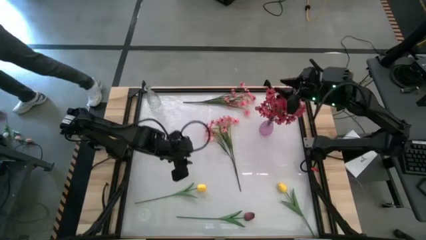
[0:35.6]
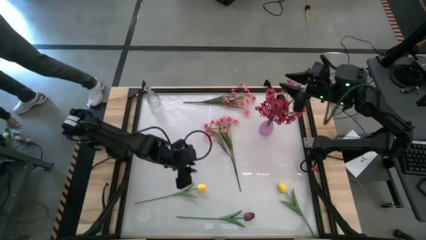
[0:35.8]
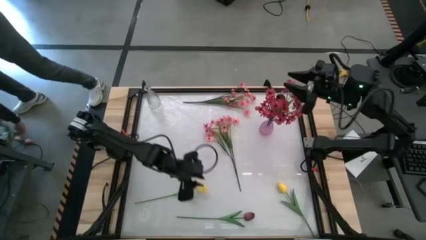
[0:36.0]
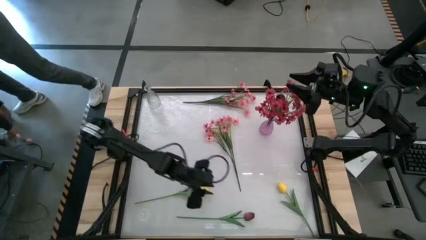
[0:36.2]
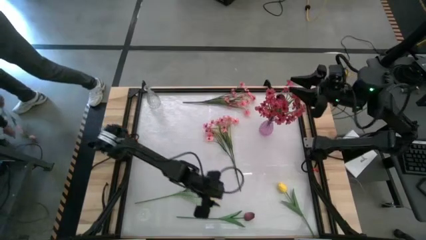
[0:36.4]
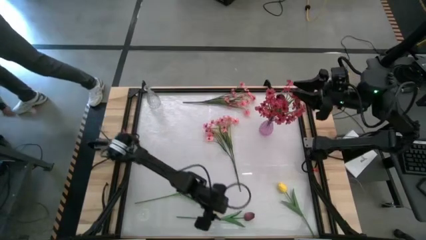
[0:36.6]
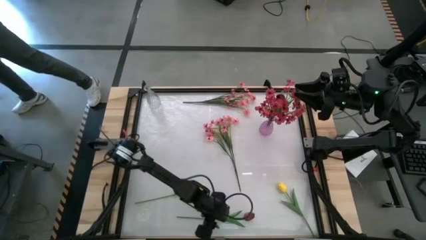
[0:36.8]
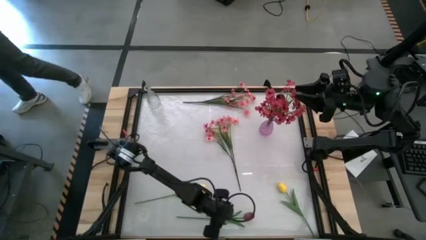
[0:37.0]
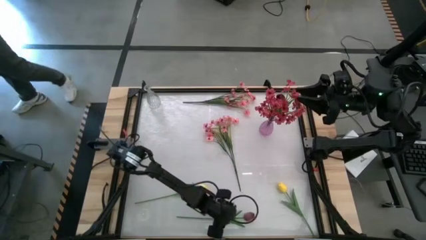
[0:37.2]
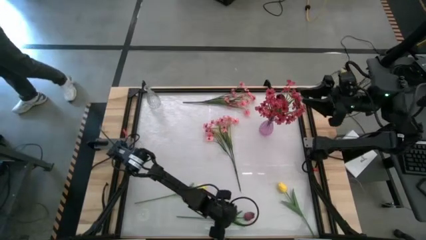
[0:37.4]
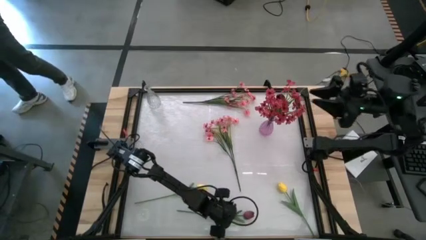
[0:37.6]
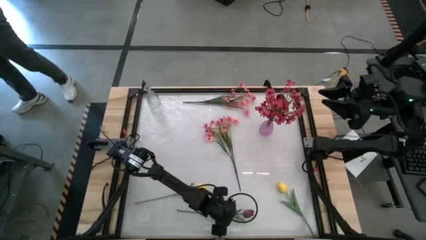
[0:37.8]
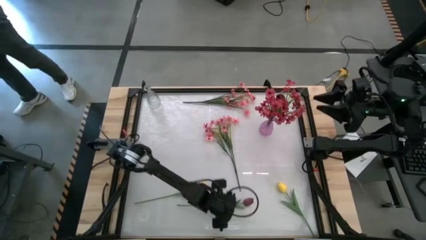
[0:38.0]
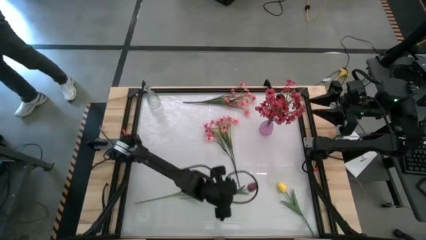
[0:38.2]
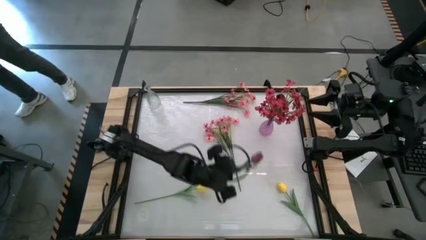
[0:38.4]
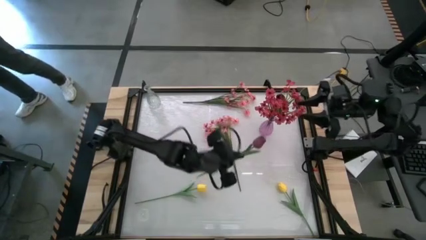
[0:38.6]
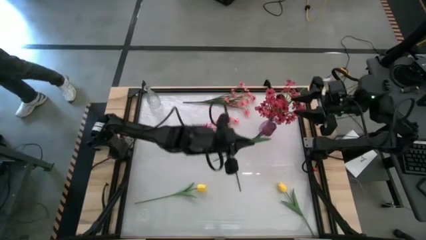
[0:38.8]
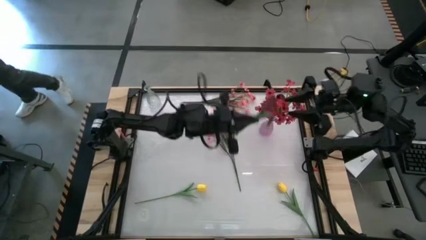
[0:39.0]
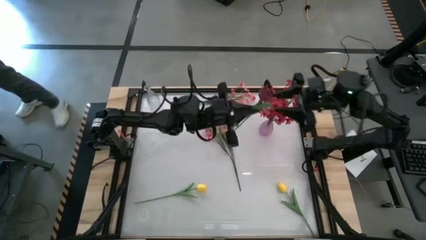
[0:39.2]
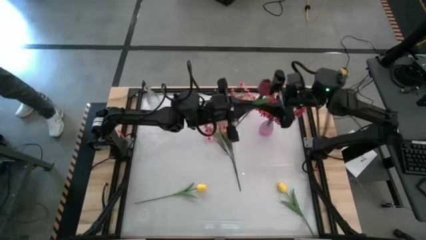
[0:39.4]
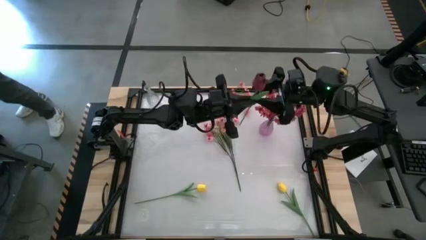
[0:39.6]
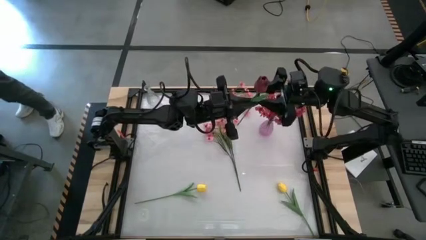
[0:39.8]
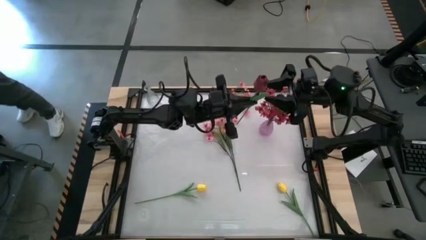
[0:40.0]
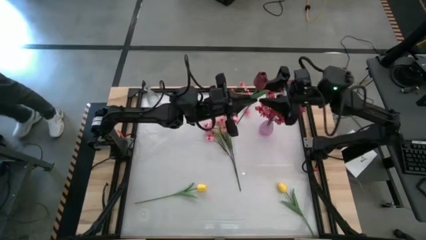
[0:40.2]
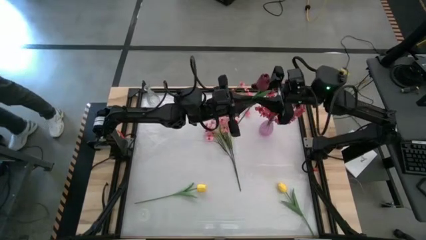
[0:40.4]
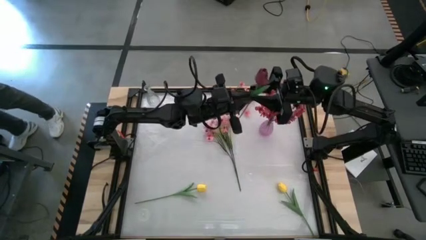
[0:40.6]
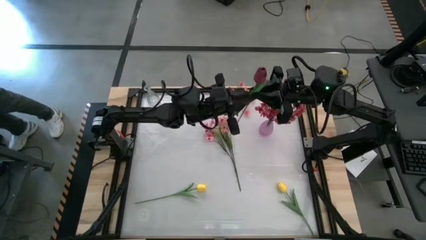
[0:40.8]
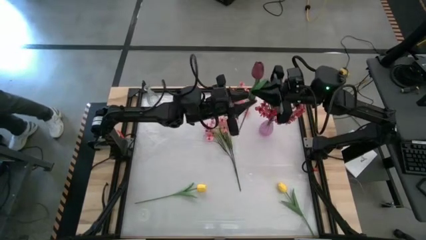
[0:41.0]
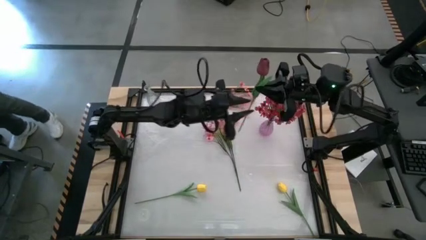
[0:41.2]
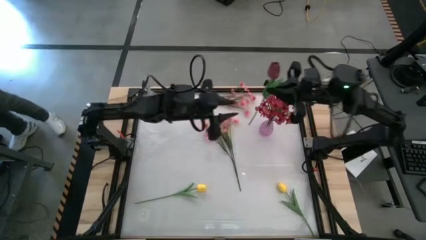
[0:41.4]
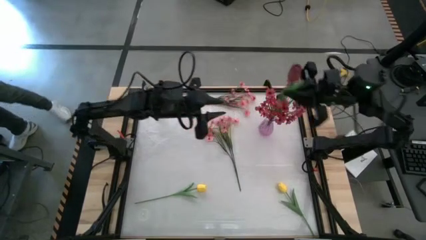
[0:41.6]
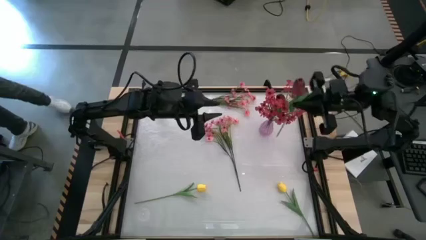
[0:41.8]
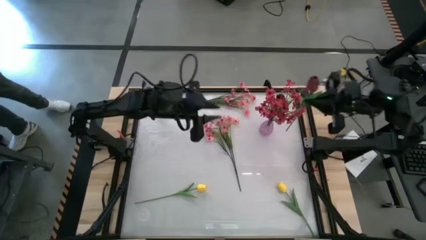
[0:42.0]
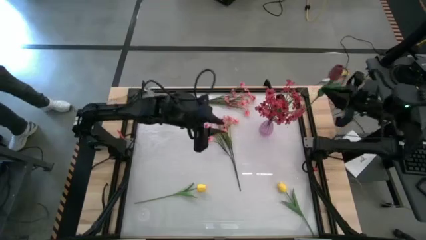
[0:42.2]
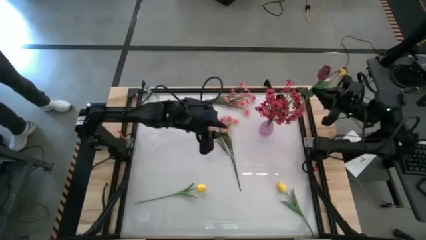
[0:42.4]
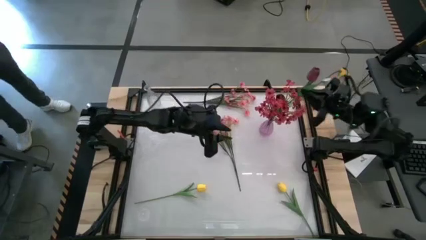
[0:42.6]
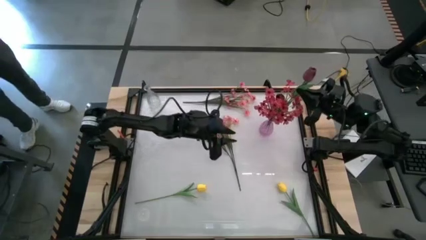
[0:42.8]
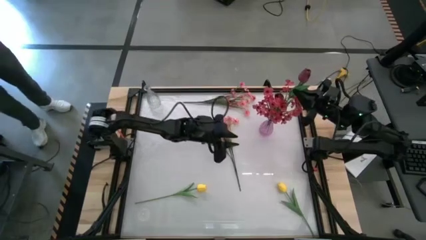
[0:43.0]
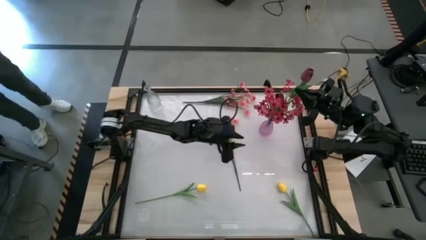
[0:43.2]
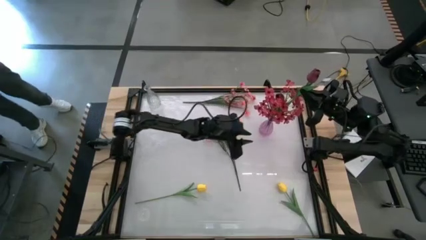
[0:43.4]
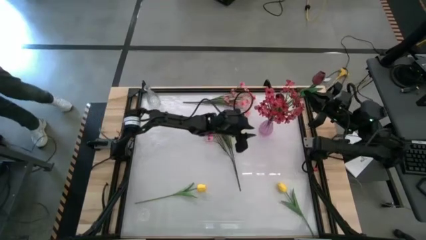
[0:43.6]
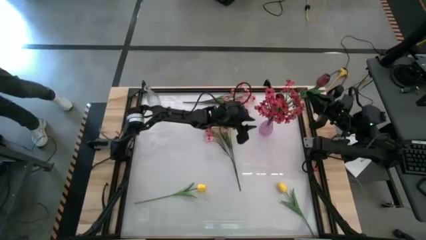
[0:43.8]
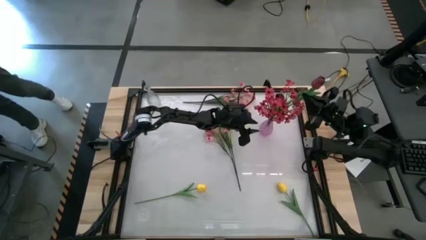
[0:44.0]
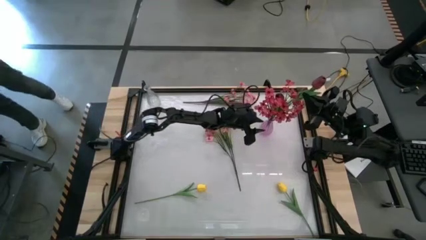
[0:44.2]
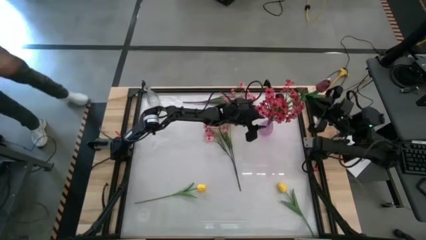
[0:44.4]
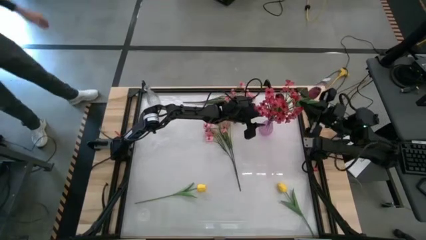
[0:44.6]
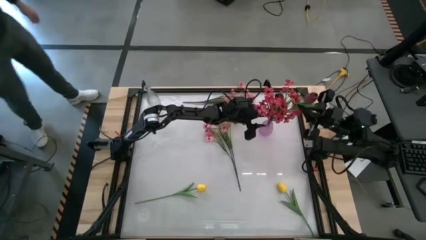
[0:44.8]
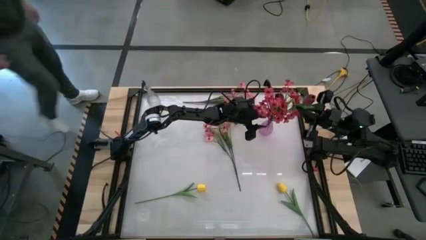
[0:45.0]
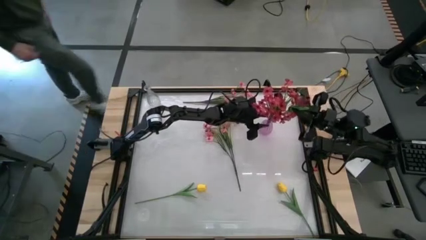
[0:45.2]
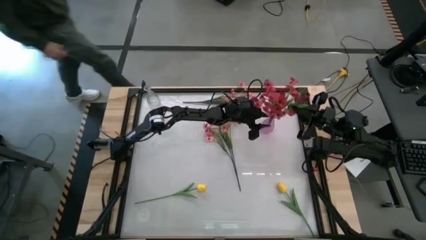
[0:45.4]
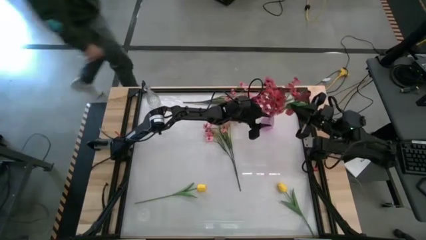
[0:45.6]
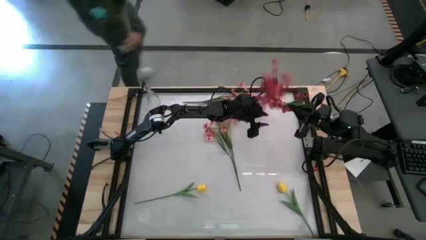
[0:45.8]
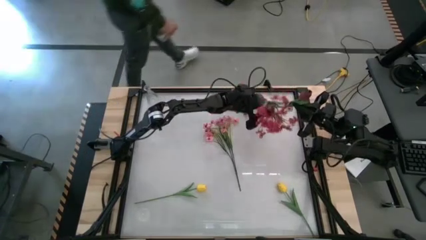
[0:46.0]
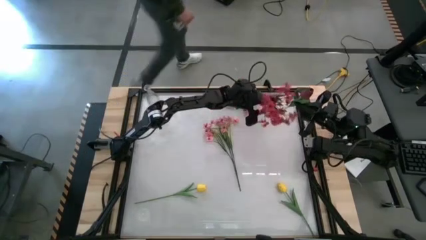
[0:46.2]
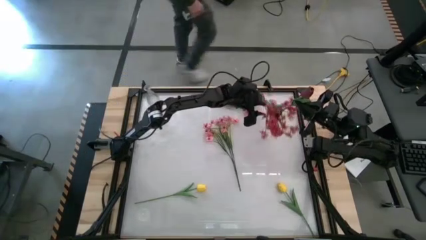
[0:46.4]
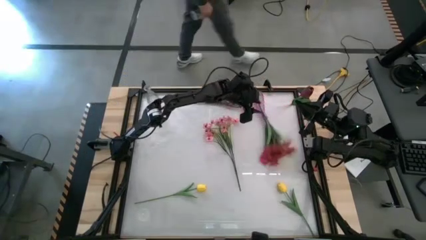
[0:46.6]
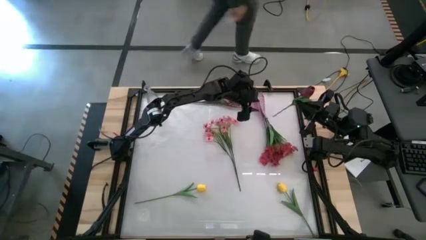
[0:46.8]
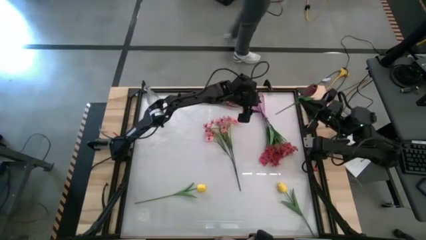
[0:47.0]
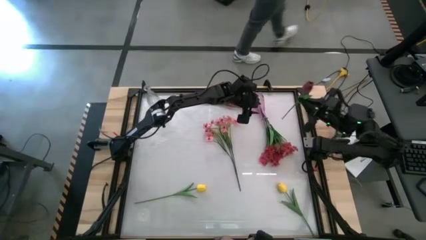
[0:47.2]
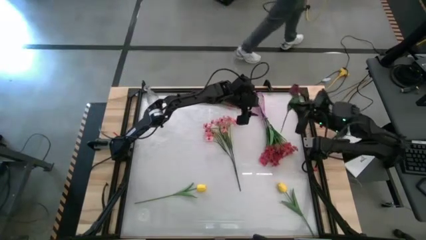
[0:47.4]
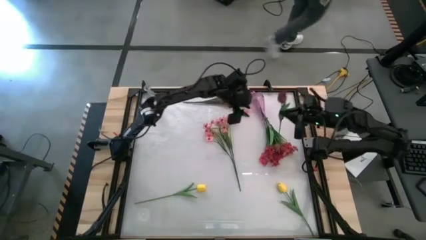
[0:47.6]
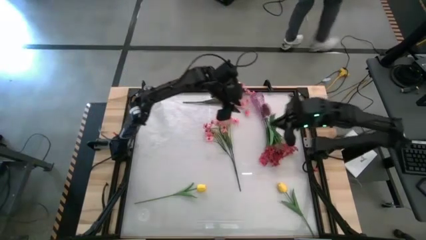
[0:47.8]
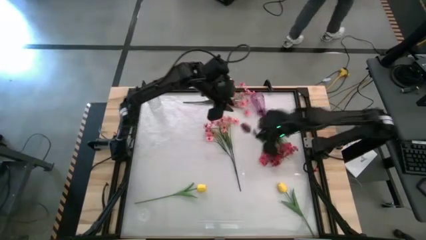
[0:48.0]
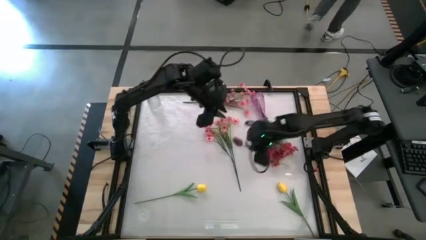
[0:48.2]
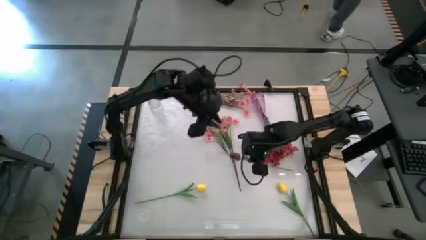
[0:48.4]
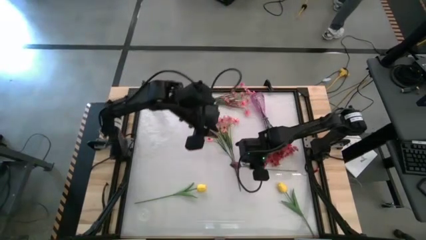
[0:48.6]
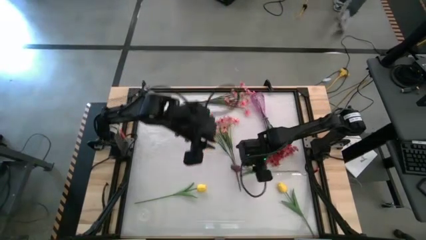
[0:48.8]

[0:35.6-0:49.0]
Task: Sort flowers into vase by color
Put the red tulip into the pink vase

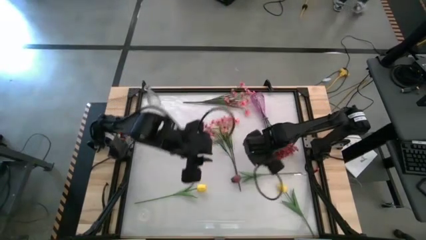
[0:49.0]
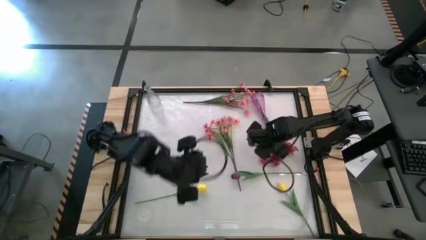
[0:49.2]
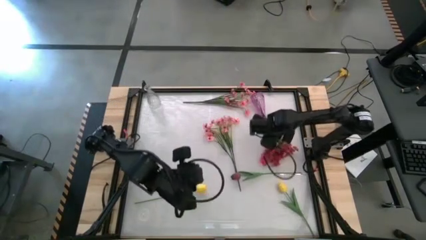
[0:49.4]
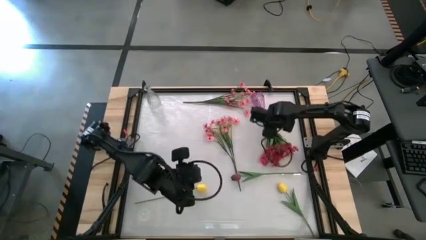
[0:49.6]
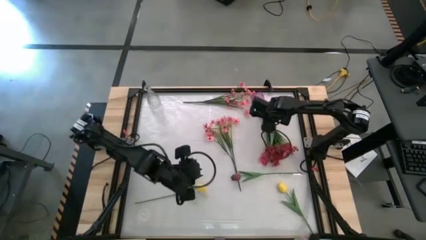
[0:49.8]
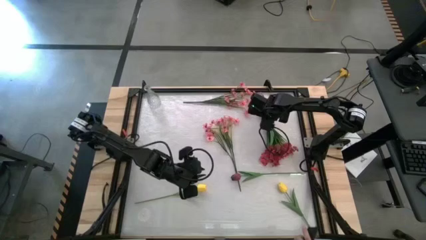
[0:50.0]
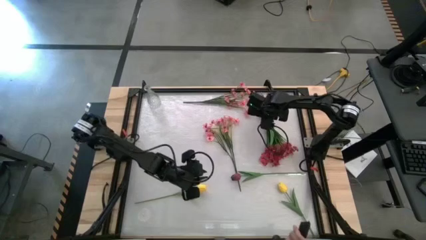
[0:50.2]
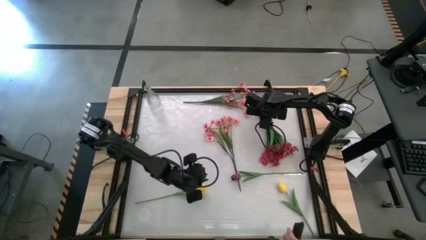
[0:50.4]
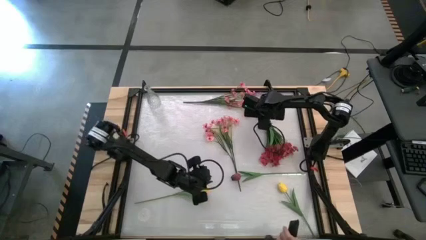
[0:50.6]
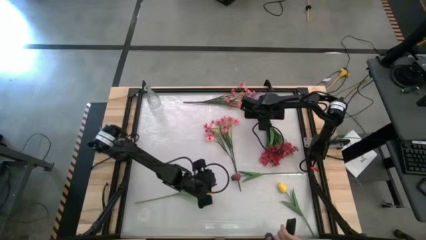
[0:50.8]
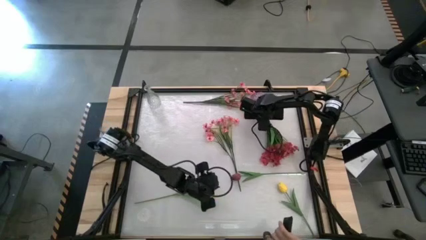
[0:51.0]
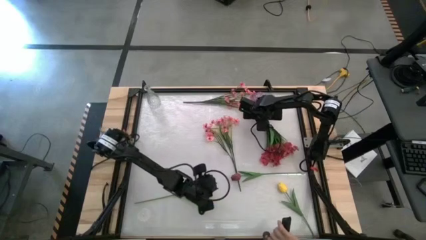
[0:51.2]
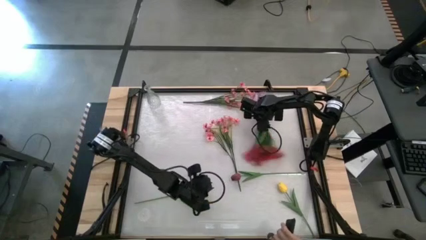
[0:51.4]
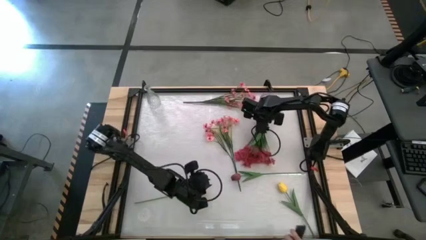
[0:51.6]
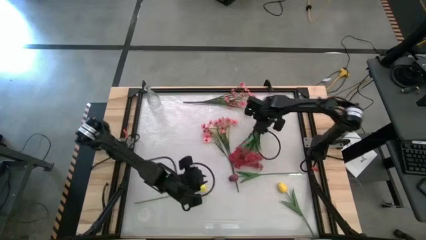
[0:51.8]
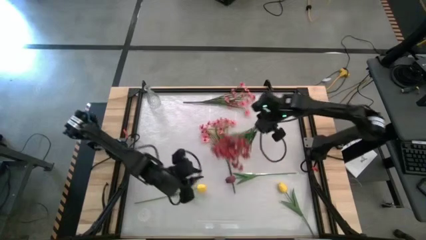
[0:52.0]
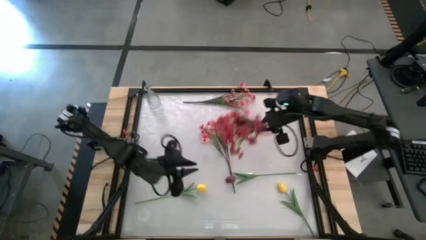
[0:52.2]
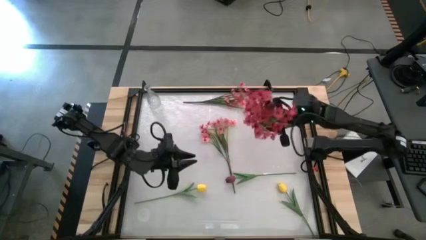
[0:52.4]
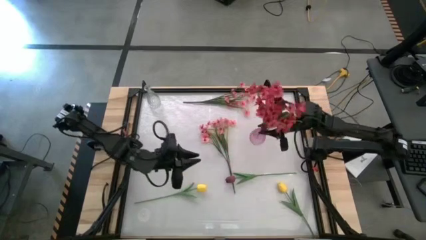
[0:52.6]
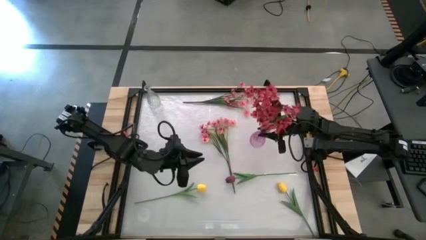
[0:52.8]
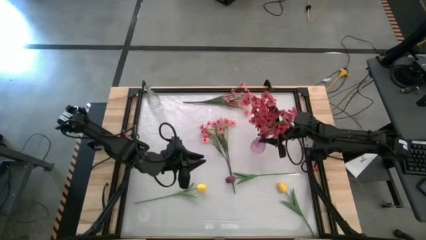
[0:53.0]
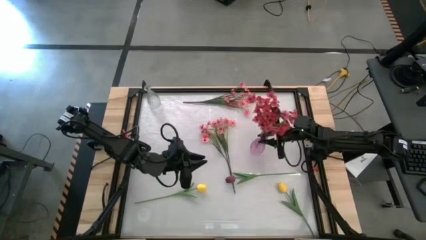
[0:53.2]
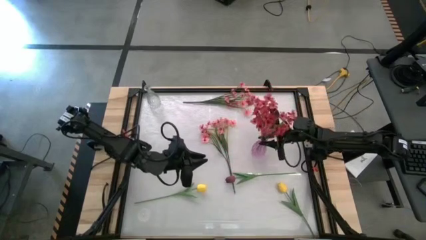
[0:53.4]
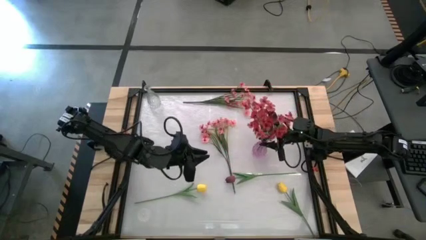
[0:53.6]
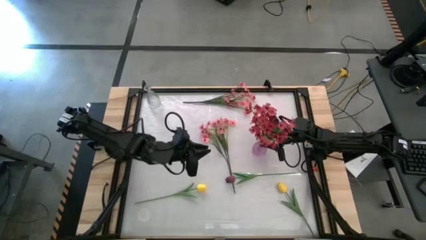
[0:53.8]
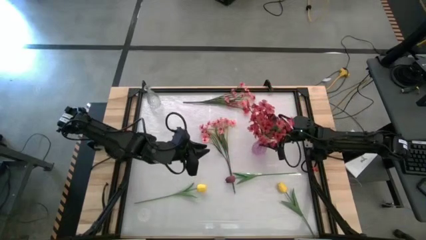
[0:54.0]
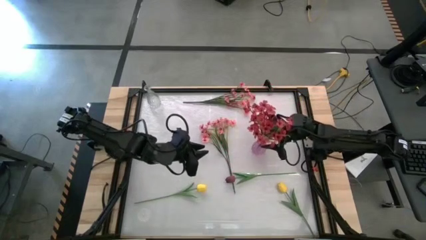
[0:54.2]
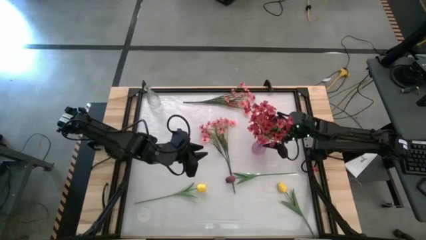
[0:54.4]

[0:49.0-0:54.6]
Adjust the pink vase
